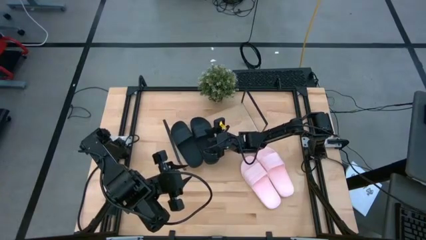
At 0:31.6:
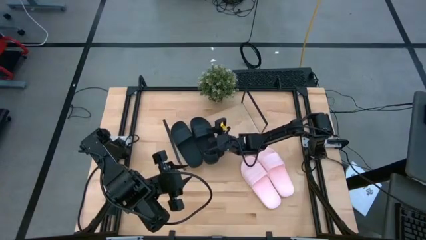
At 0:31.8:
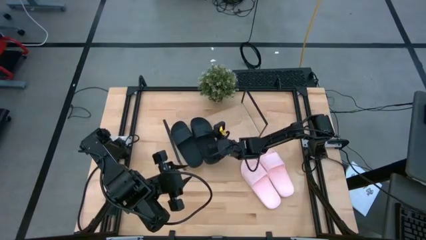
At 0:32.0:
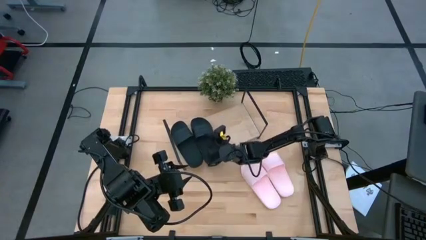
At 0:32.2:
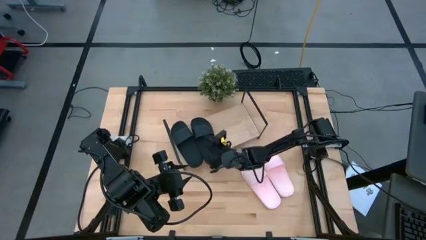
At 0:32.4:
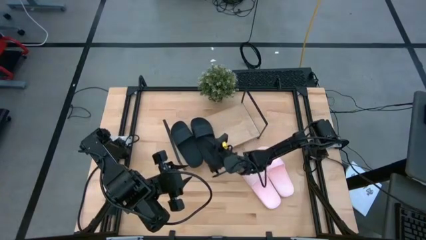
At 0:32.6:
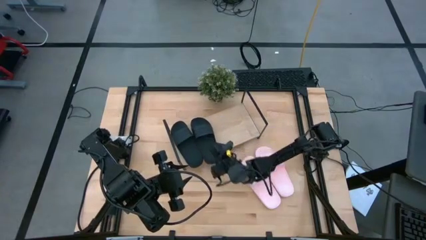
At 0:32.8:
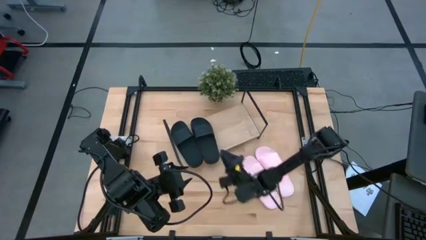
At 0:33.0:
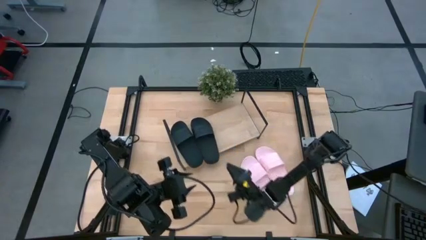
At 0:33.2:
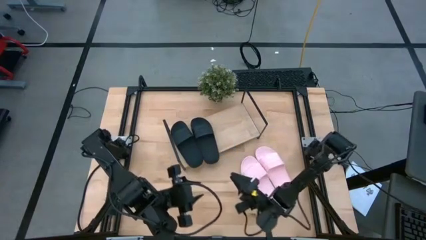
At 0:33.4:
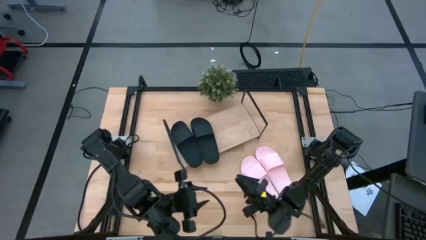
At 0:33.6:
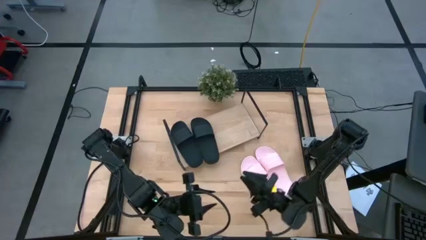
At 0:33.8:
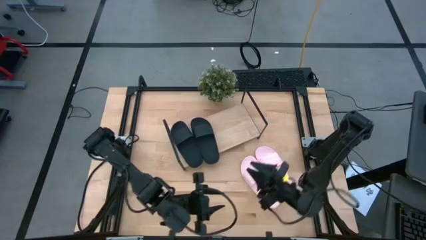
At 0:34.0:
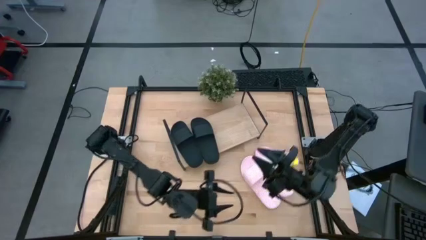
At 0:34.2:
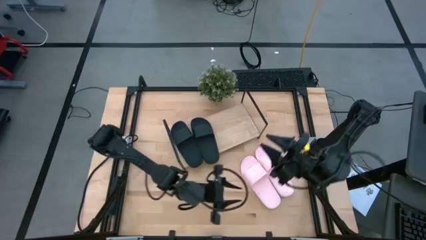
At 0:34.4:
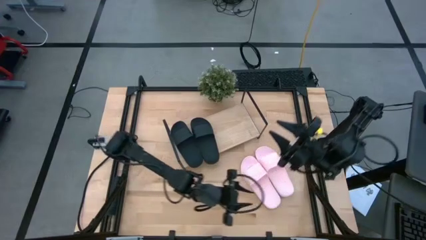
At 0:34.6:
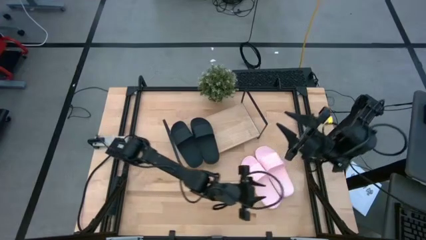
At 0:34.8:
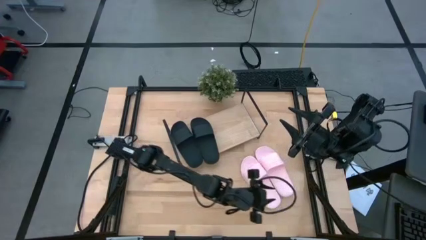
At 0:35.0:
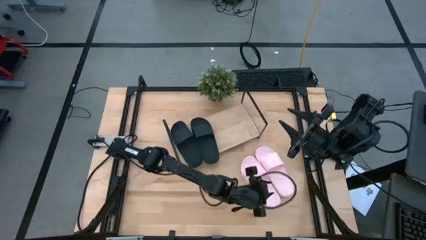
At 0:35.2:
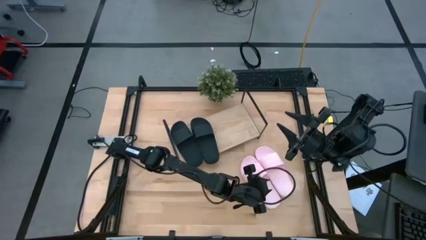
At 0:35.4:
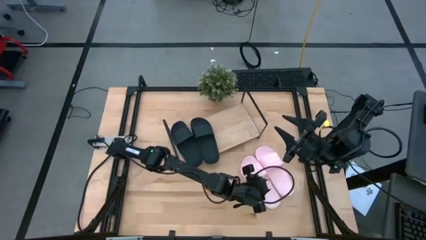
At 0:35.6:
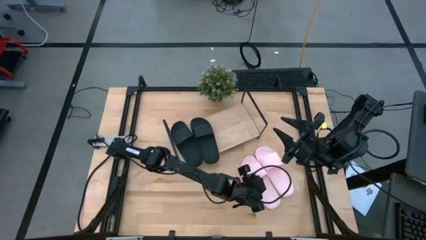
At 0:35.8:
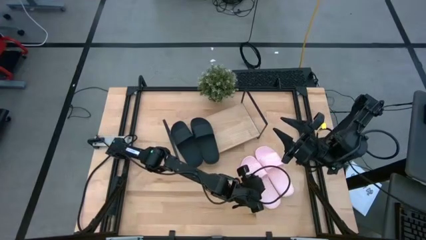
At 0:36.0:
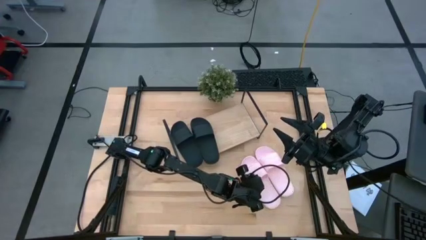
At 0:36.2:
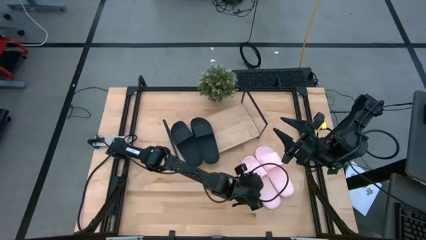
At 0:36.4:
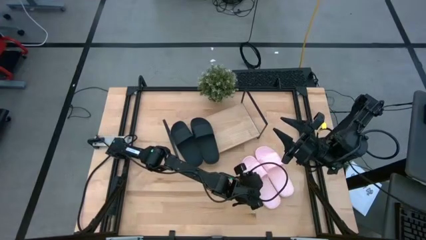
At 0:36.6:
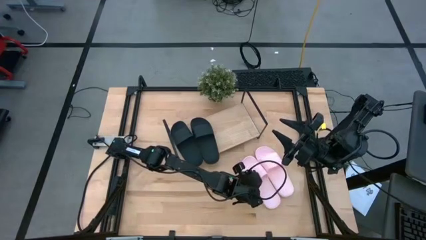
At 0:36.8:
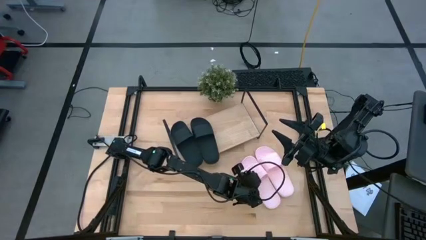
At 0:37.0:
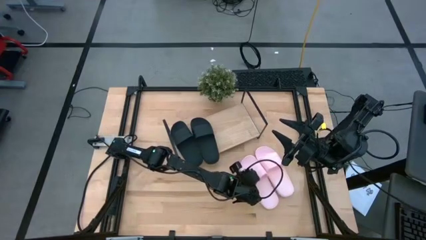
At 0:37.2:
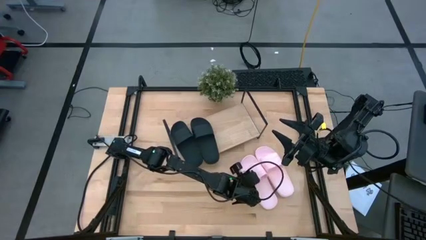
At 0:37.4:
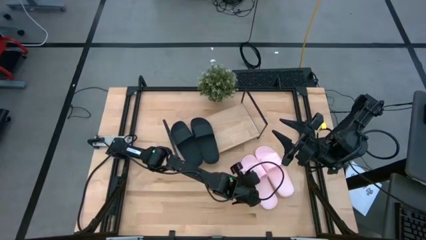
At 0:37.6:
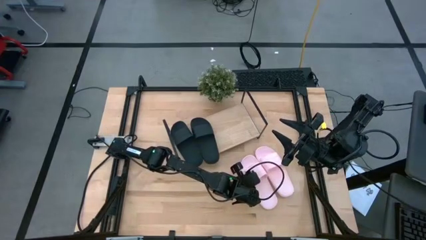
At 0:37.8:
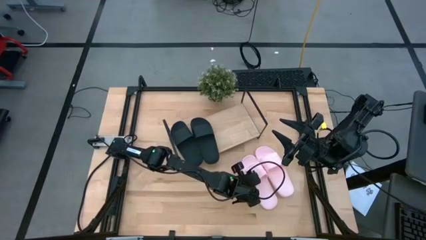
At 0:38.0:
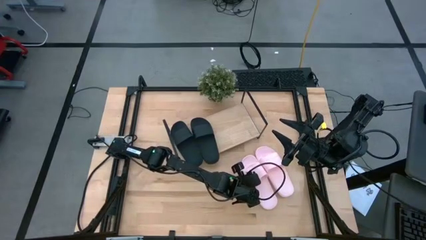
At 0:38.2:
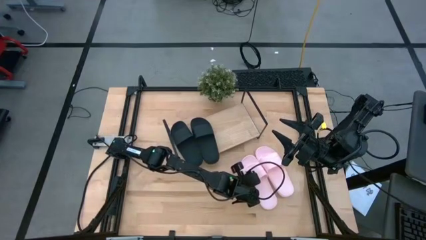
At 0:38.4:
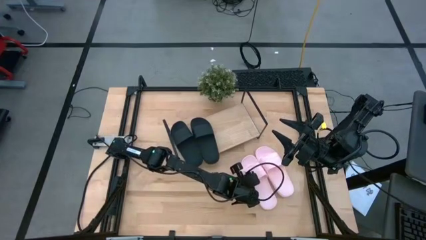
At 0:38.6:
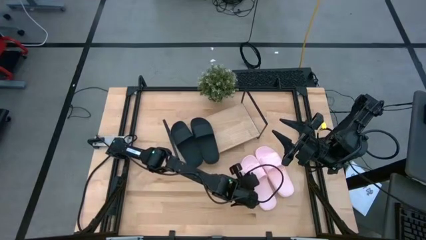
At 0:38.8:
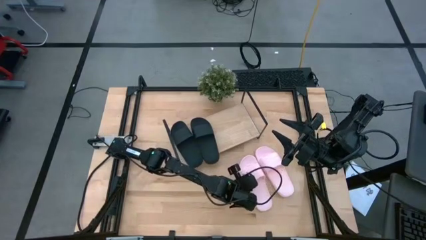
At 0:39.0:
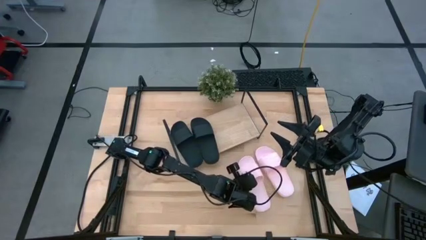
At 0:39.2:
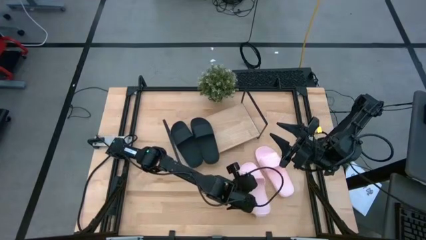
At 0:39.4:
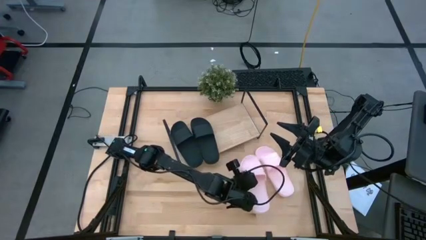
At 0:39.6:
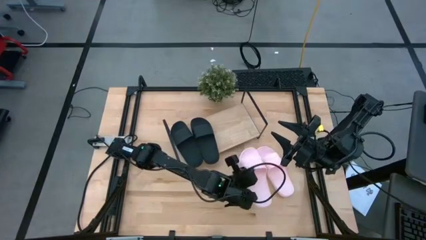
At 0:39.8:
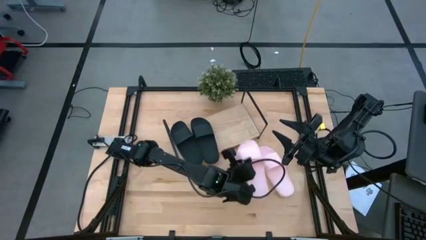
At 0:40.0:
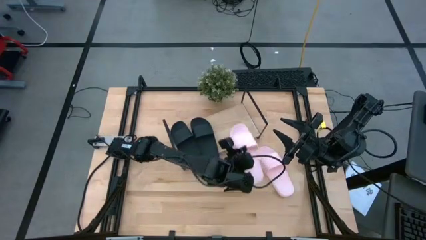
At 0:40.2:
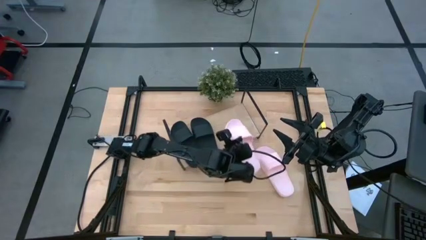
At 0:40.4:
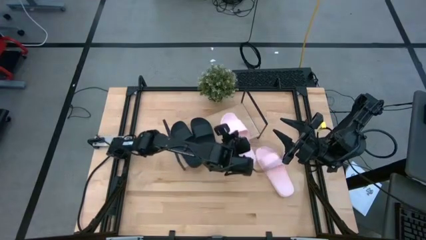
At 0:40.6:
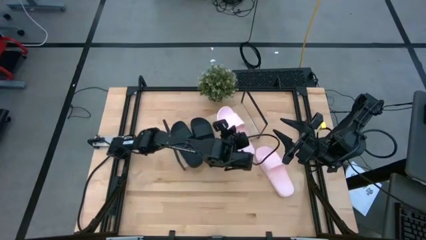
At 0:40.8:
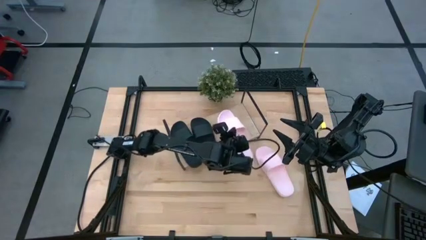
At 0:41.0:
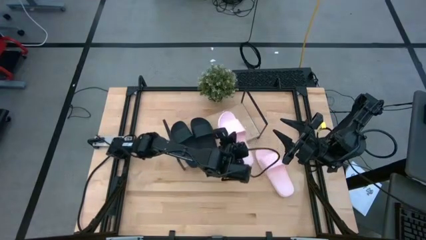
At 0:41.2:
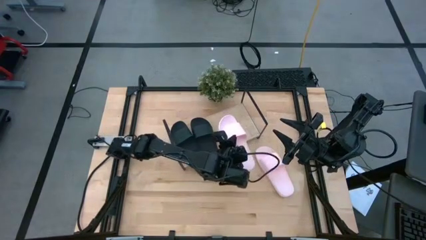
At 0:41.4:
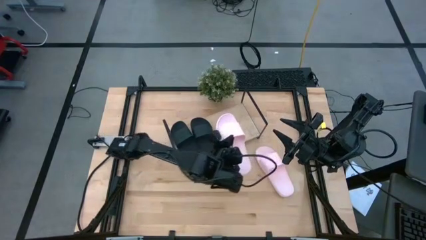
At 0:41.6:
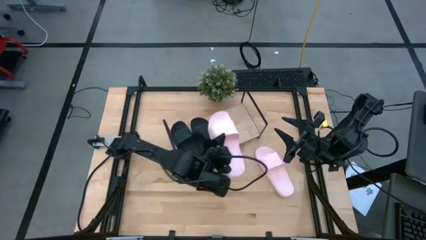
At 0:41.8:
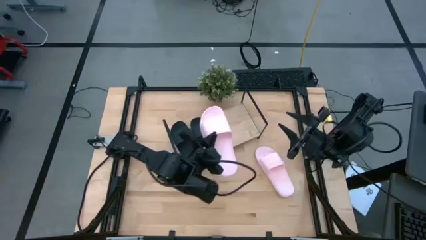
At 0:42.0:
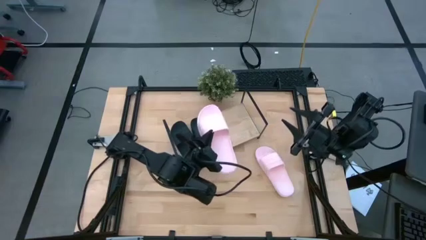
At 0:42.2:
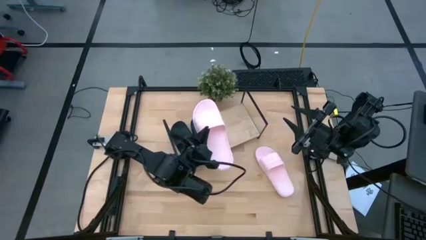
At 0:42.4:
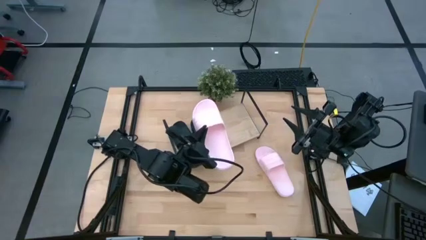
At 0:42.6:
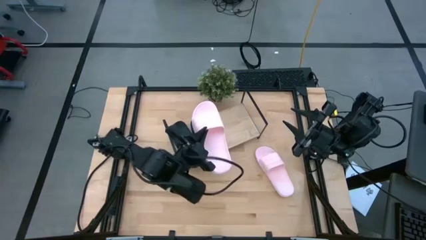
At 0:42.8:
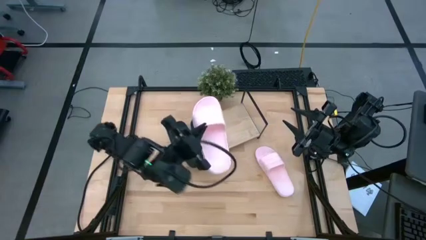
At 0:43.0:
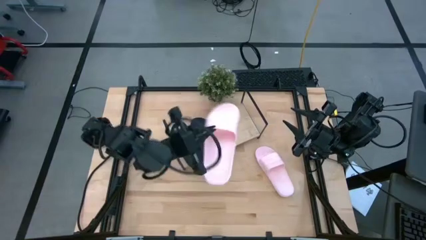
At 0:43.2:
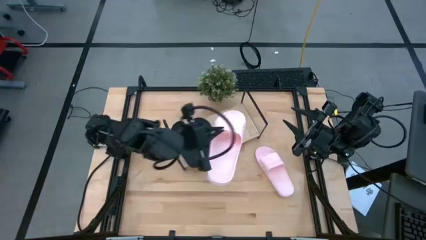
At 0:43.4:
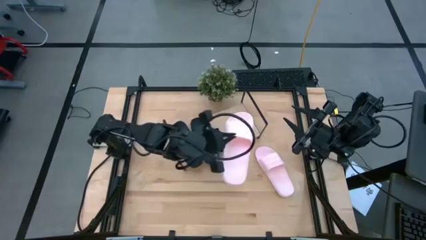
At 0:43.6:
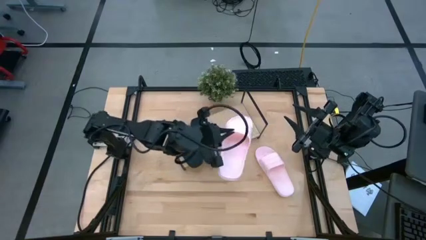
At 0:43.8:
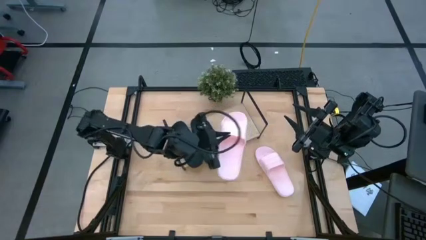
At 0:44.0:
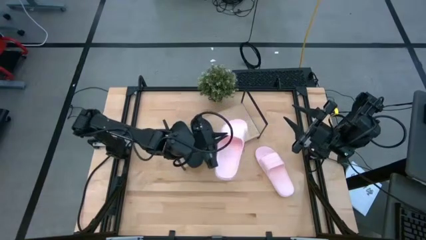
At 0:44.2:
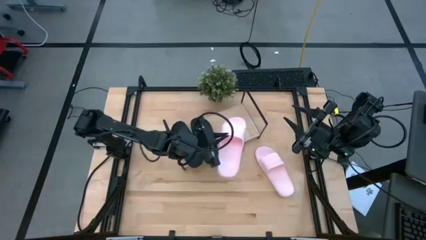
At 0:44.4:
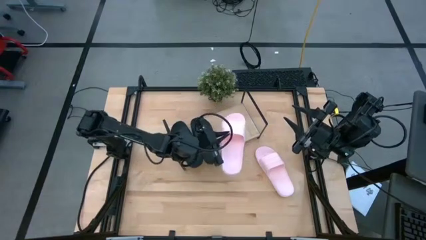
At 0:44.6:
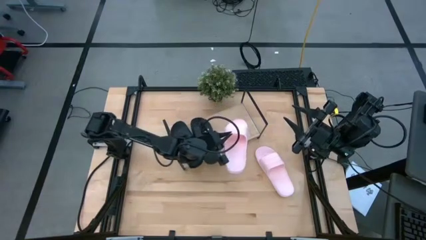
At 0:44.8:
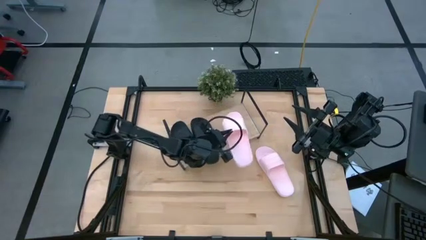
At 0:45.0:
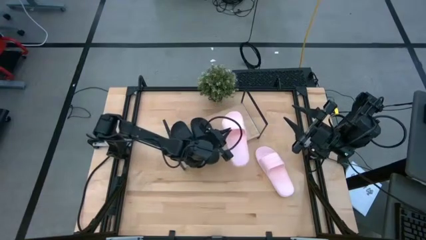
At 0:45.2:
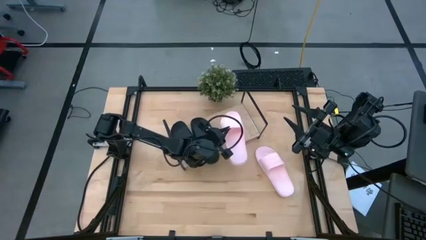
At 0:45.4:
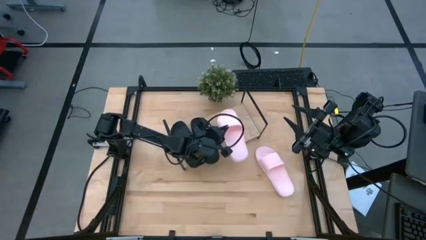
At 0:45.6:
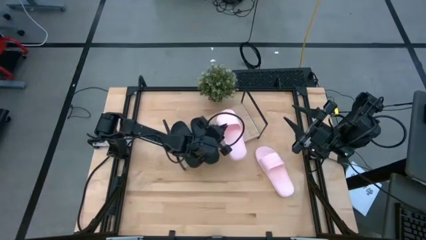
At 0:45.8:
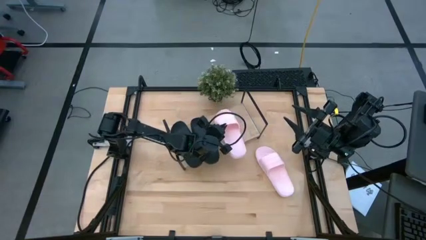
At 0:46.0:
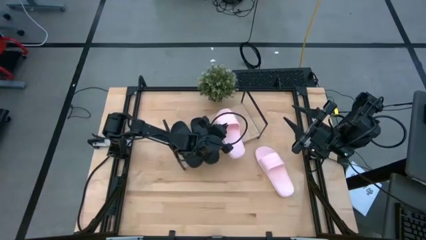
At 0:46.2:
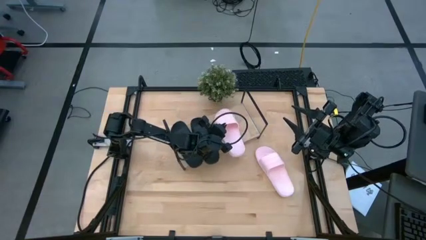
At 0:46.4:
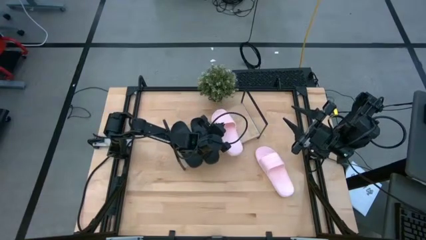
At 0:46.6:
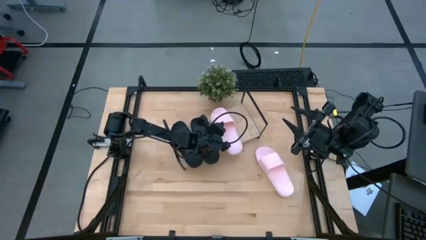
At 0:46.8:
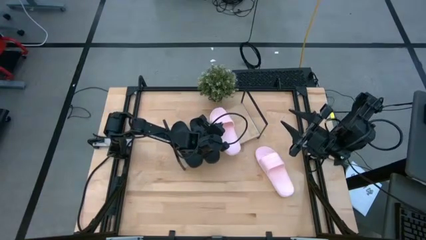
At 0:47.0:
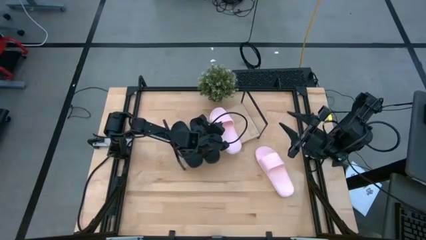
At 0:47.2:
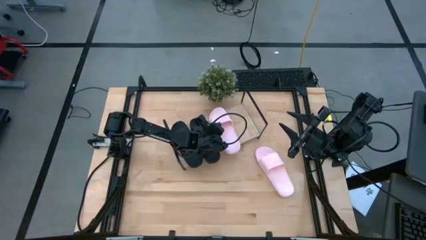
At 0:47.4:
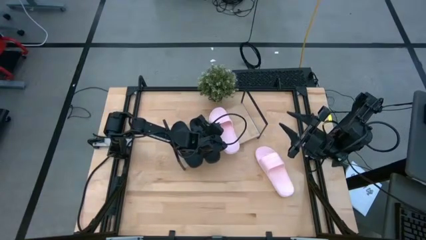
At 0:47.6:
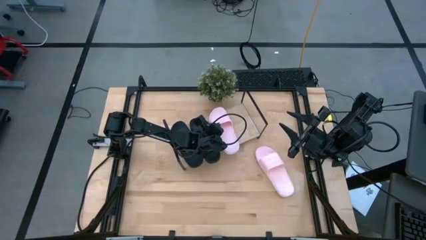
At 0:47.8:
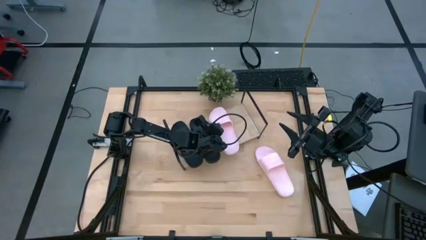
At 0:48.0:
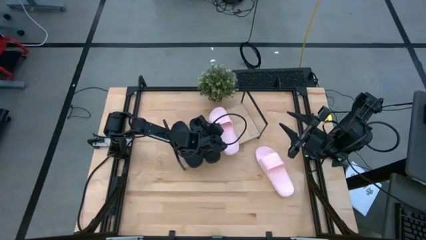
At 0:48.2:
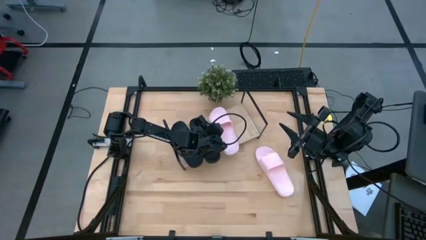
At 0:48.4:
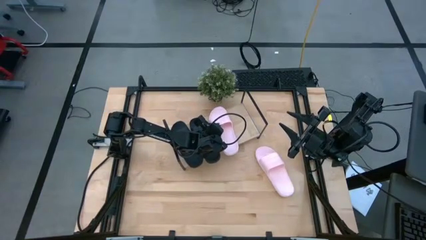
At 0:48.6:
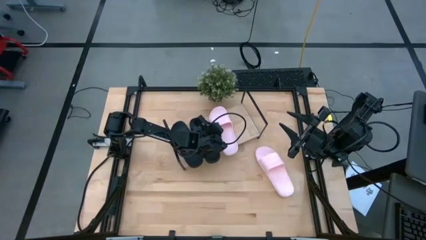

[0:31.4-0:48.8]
Task: Pick and place slides into the shelf
Put the left pair pink slides on the shelf
